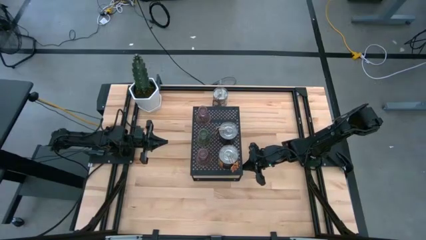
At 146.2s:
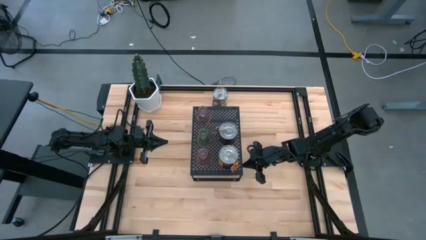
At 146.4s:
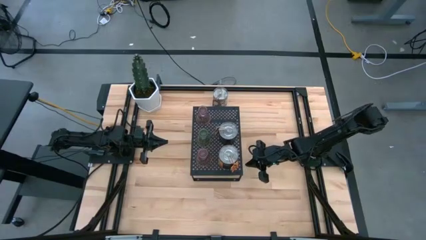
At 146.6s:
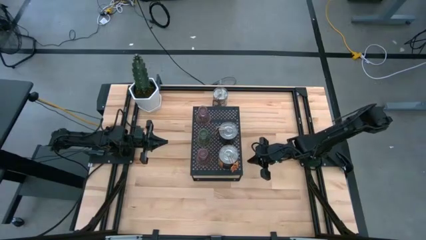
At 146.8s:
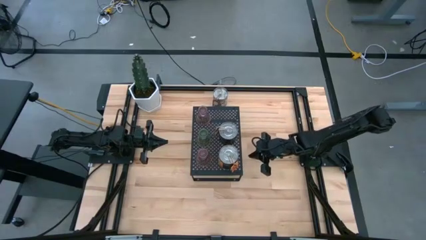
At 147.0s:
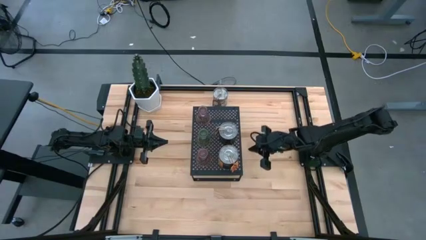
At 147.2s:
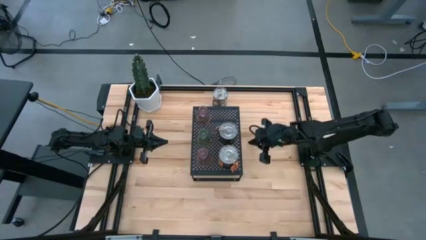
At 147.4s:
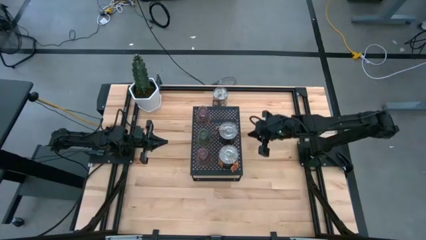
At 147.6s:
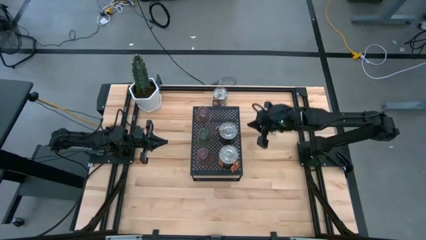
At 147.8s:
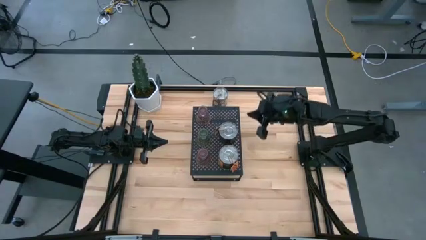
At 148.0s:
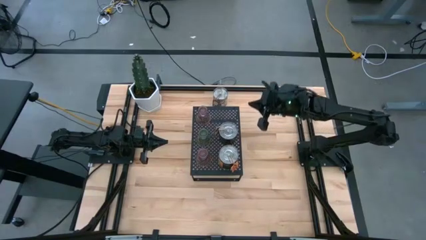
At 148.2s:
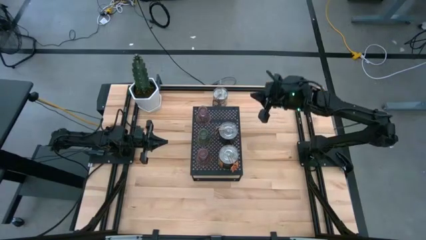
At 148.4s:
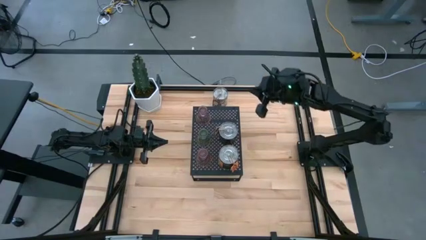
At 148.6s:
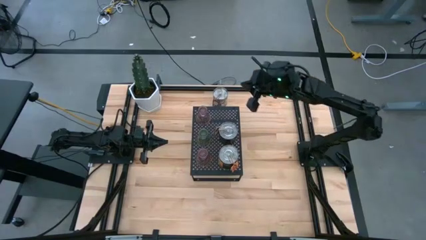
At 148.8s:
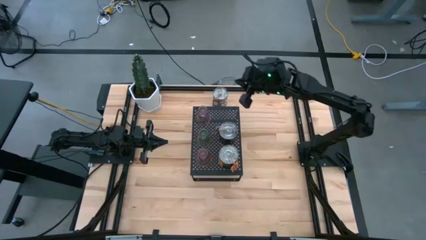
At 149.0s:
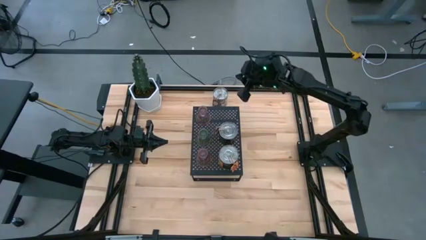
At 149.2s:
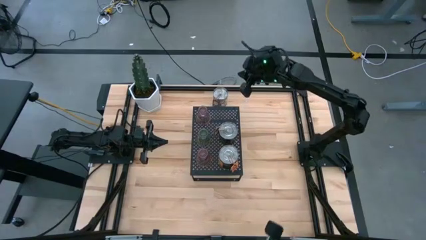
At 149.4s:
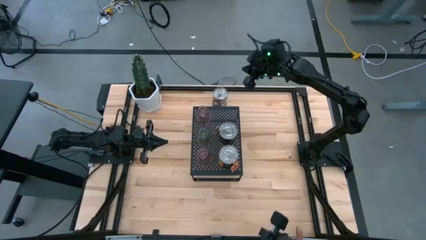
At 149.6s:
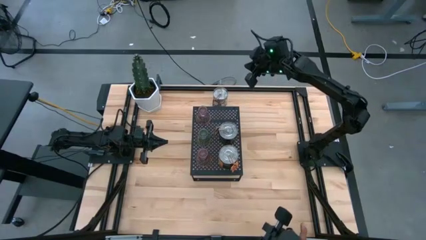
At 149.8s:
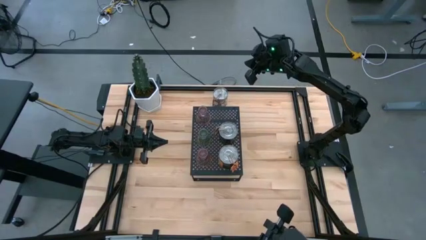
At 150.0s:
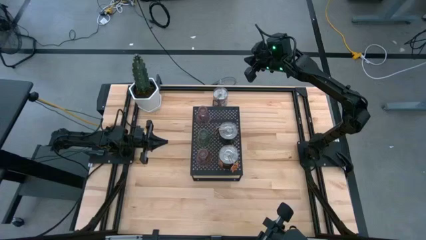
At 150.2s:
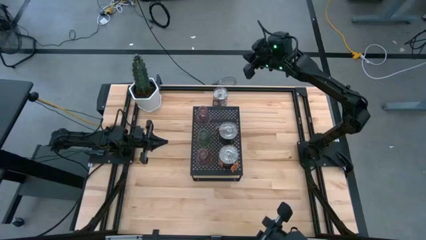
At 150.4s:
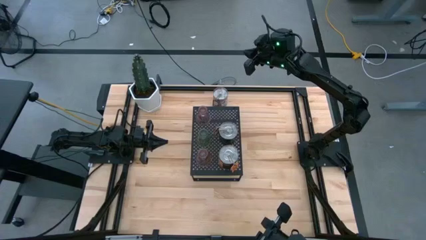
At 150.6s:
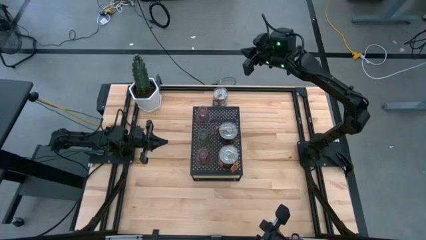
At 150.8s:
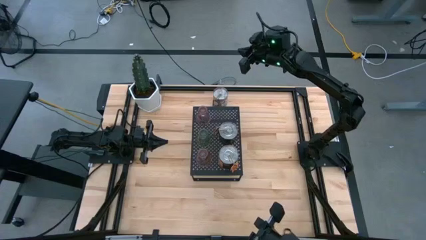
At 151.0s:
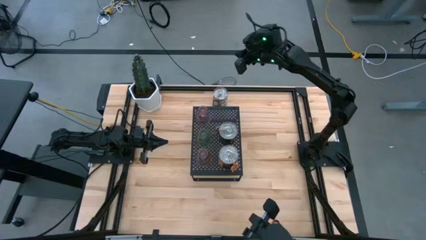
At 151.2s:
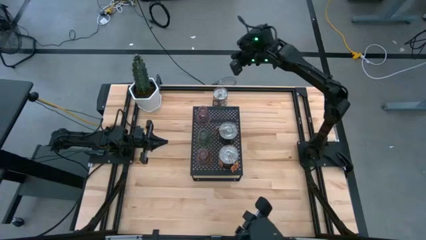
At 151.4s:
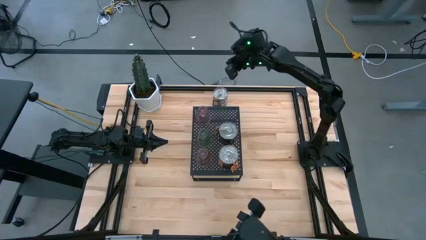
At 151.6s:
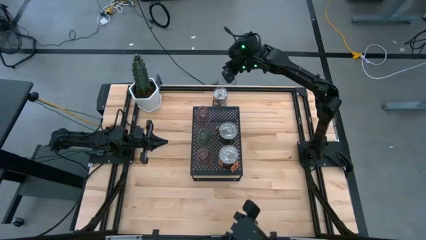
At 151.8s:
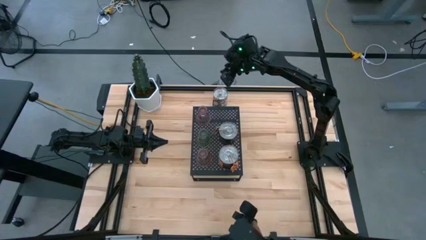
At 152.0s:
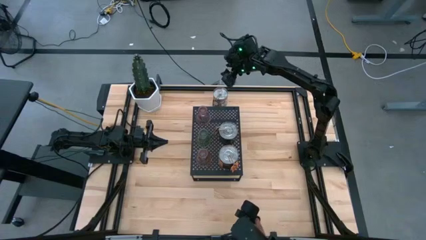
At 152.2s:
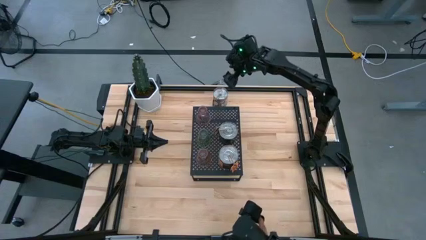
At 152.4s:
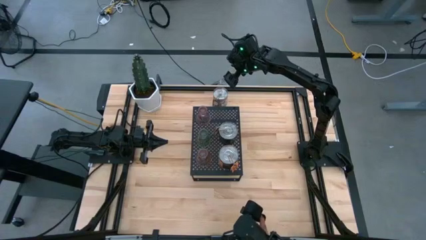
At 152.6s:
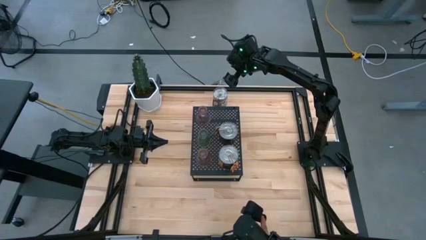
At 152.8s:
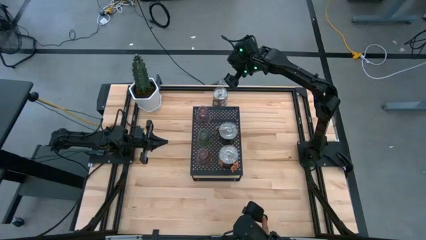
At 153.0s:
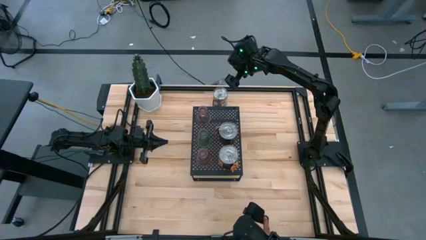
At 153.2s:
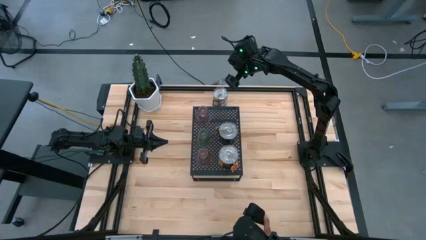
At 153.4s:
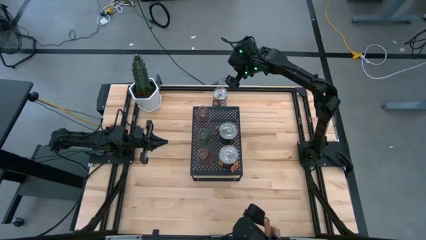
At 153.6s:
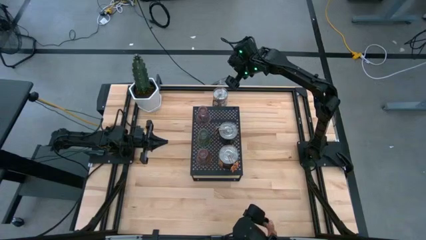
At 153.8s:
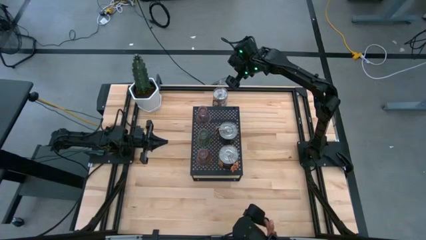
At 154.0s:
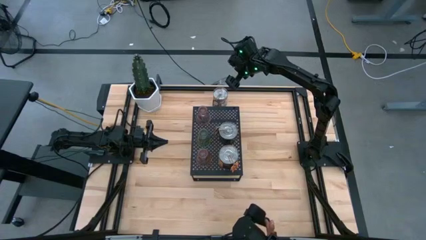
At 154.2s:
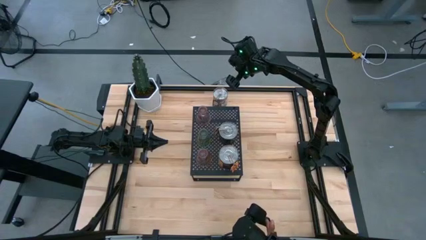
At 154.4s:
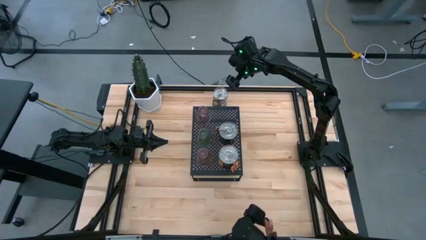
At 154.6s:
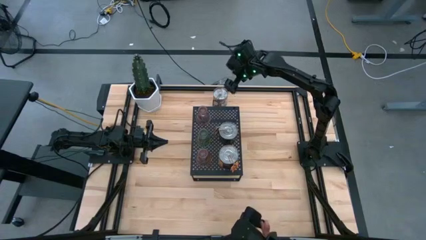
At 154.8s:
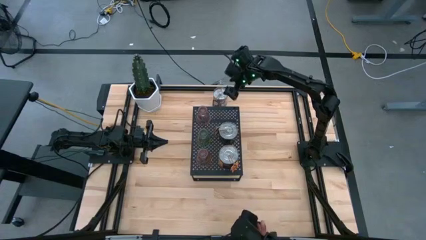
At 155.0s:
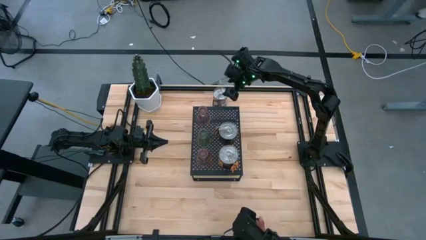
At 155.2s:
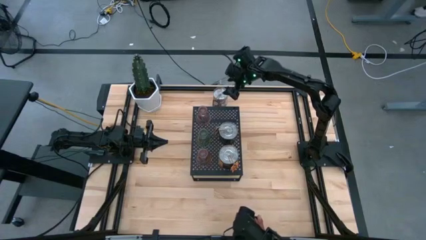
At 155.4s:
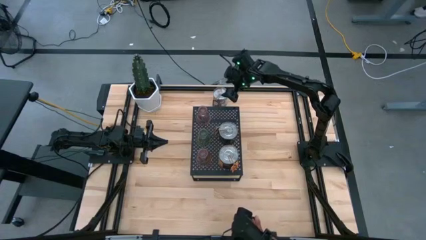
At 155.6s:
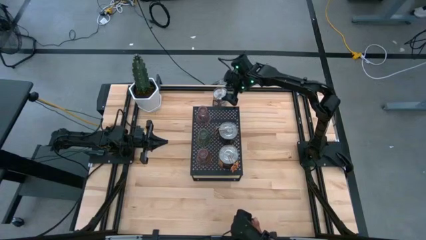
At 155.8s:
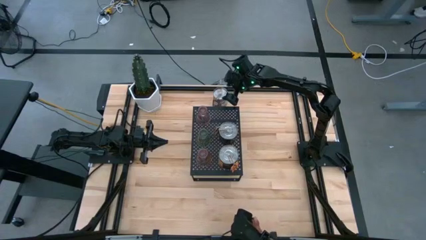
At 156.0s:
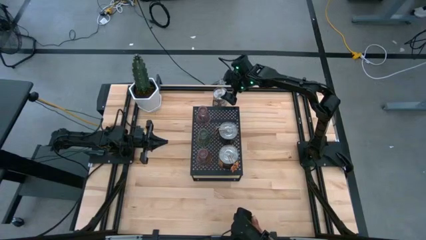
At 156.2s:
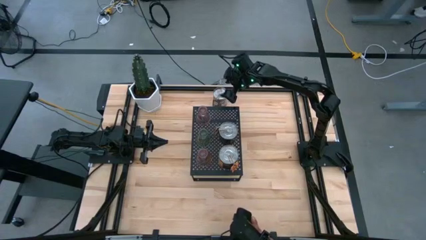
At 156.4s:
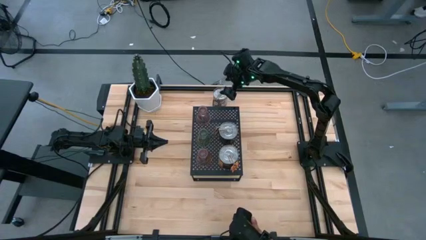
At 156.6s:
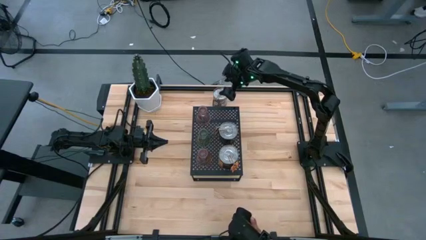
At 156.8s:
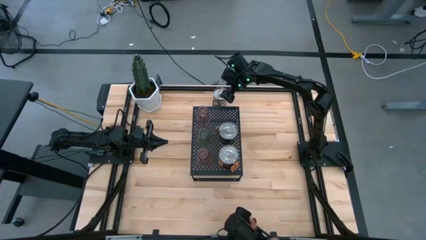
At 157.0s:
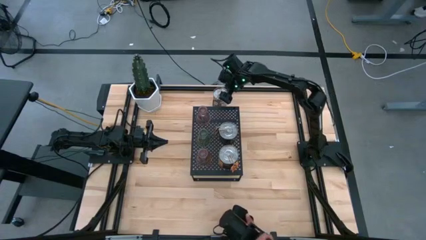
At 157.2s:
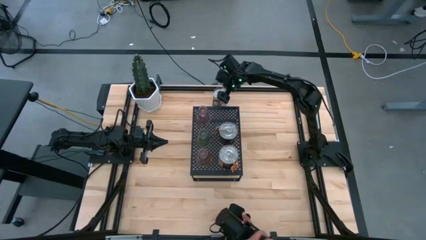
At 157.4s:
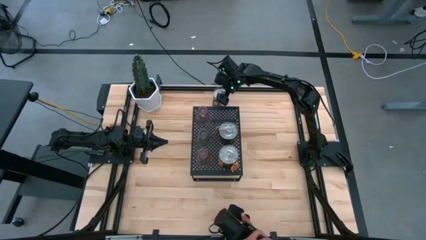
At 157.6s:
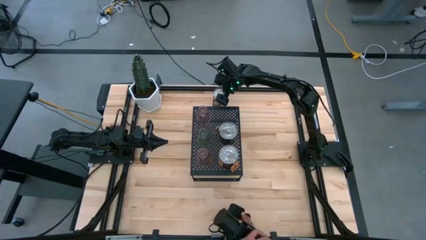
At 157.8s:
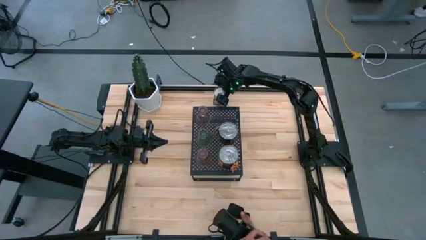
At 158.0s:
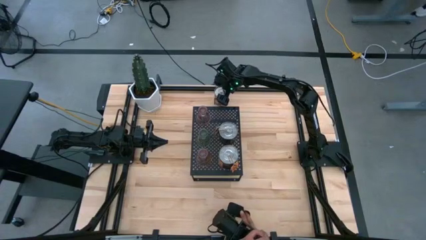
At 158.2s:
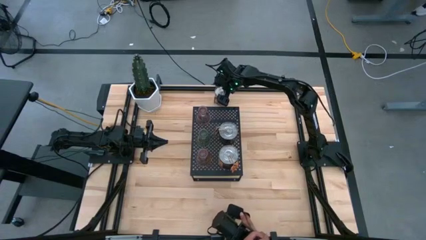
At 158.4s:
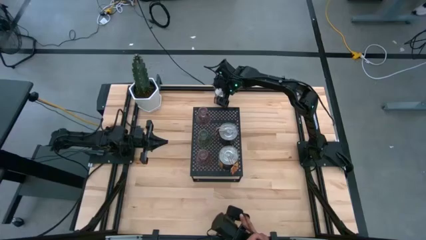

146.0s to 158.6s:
Task: Pick & Place candle stick holders
Put the brown scented candle on the shelf

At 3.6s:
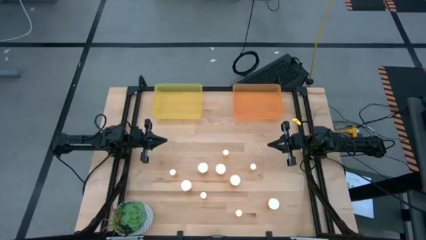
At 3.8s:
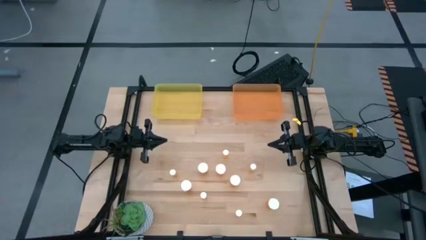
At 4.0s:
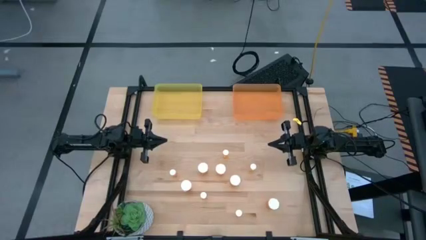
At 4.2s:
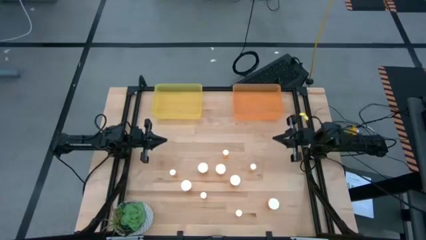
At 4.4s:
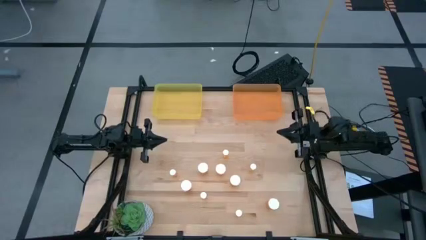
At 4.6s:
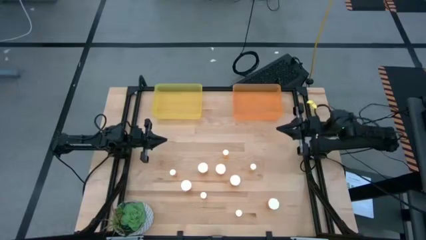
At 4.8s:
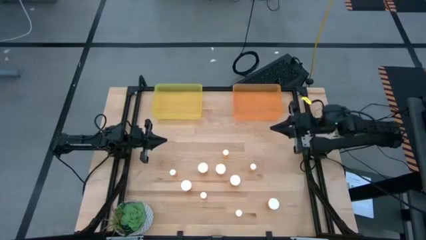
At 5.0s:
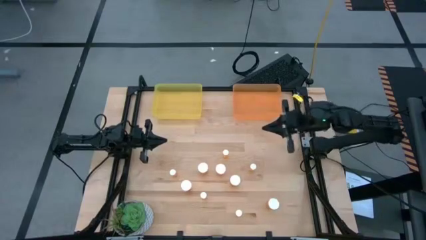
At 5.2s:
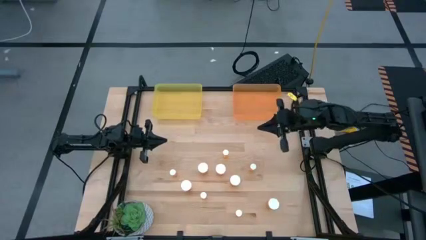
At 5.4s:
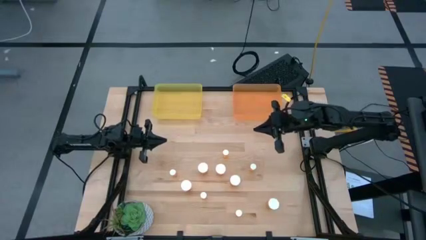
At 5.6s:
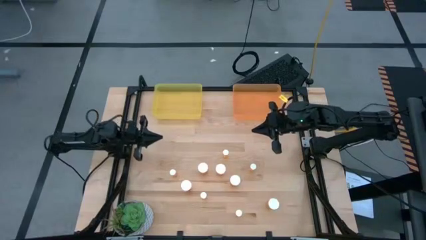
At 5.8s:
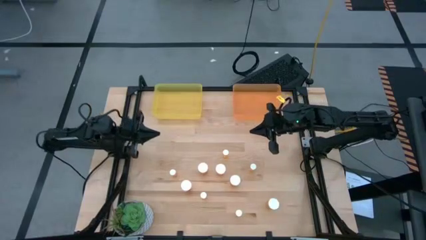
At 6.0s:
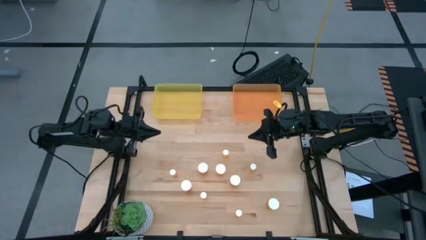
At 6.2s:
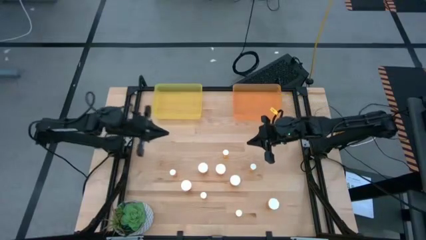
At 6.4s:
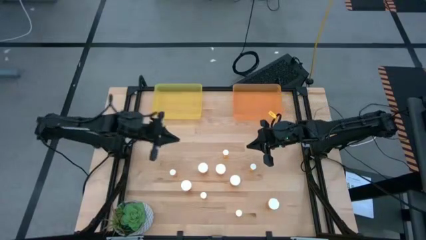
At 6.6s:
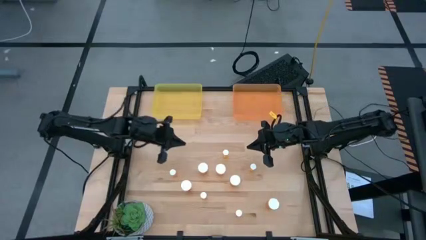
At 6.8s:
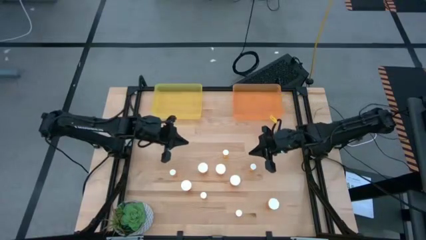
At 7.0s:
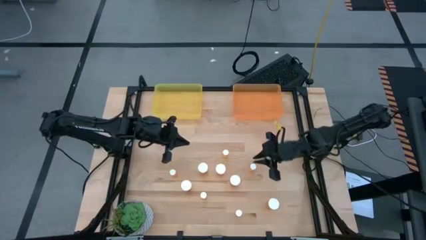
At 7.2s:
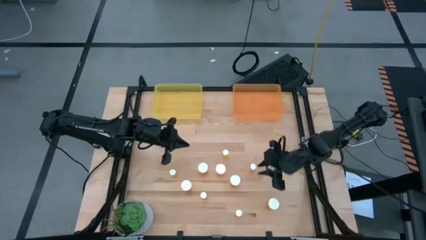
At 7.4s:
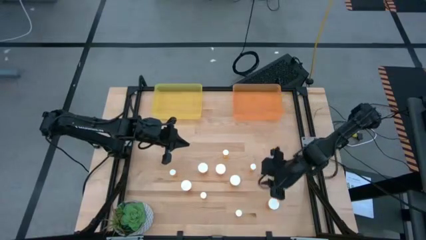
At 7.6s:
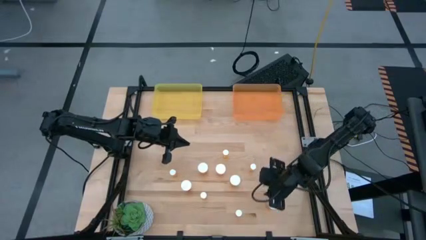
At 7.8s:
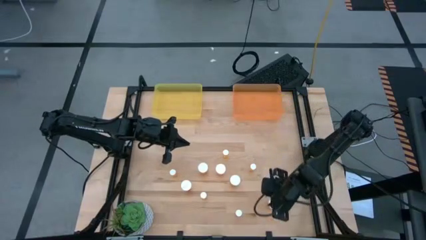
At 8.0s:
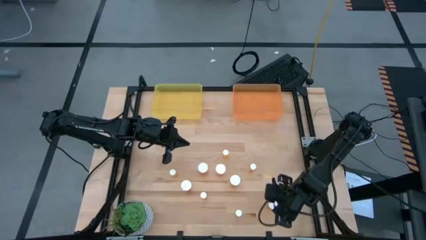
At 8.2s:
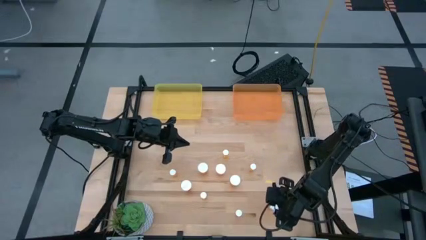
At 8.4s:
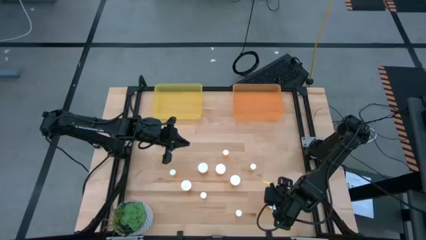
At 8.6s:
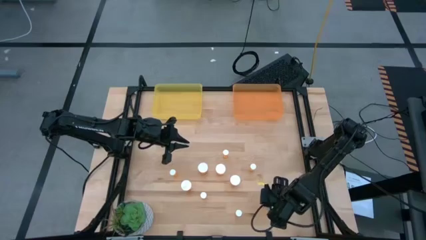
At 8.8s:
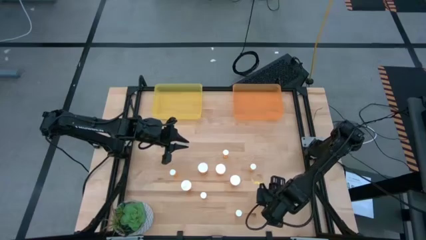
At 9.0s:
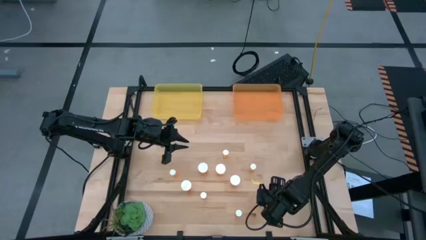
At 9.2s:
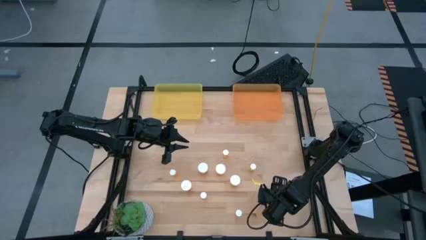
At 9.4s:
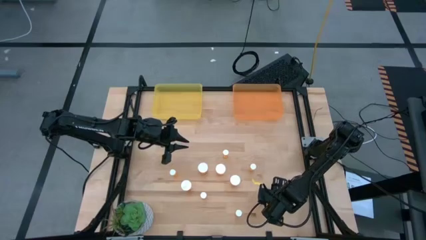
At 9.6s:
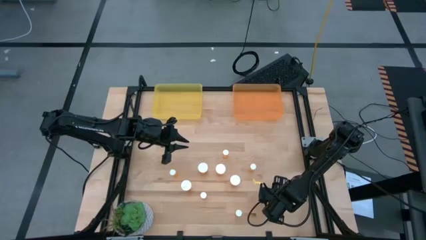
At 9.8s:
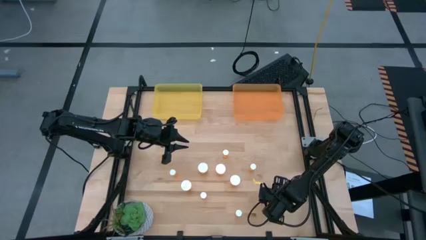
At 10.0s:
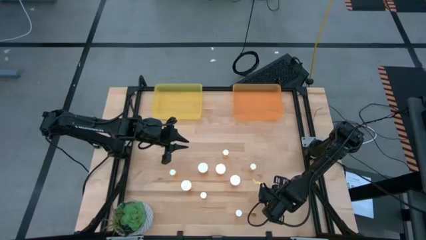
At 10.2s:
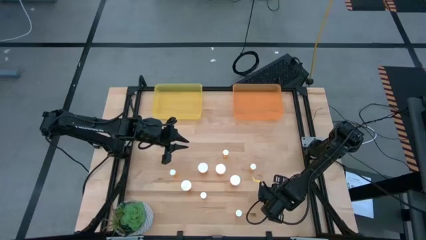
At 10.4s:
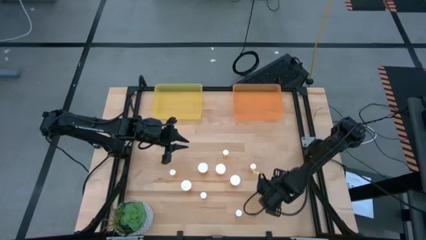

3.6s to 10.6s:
Task: Pick and place medicine bottles into bin by pill shape (circle, oval)
Put the big yellow pill bottle into the transparent orange bin
